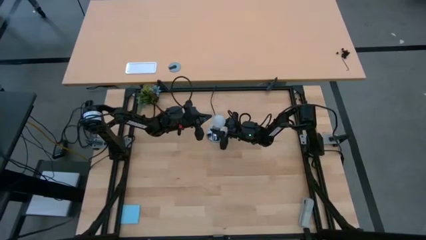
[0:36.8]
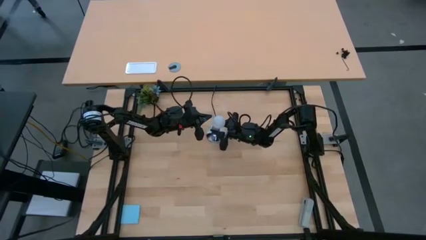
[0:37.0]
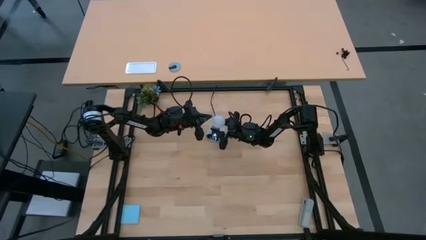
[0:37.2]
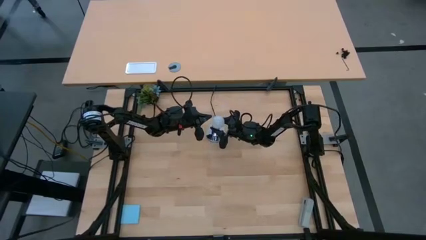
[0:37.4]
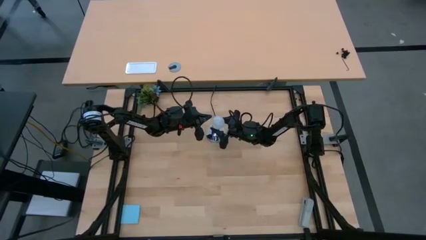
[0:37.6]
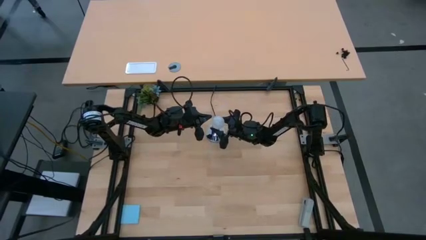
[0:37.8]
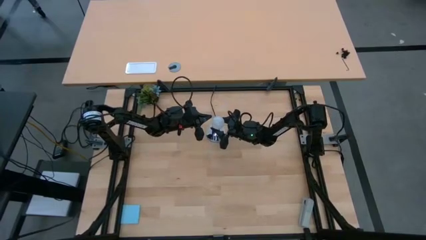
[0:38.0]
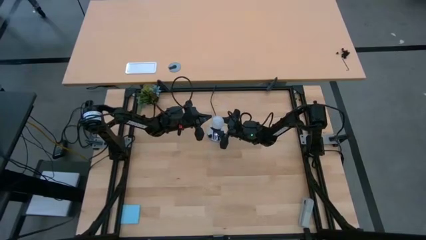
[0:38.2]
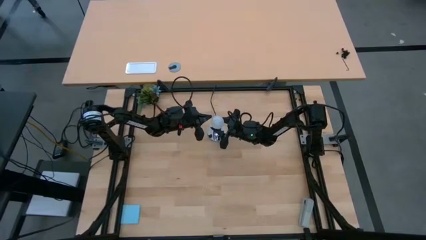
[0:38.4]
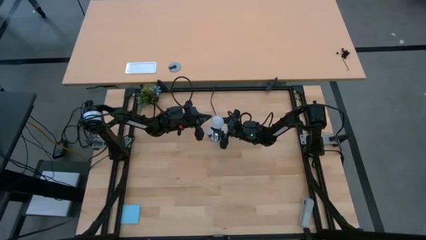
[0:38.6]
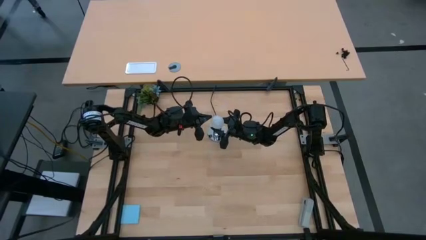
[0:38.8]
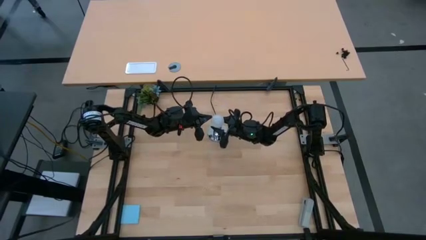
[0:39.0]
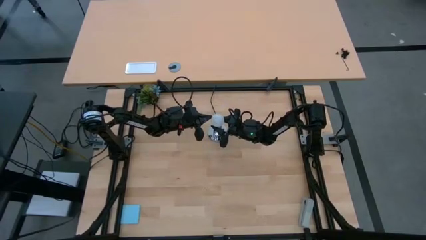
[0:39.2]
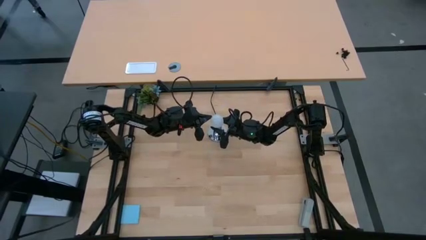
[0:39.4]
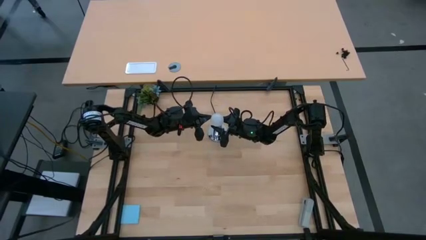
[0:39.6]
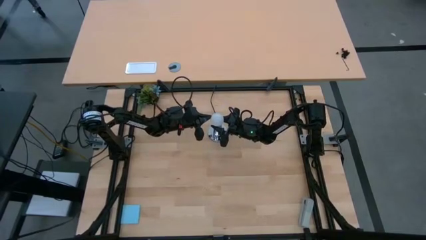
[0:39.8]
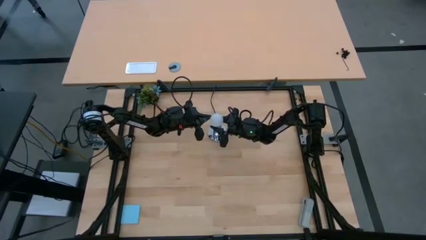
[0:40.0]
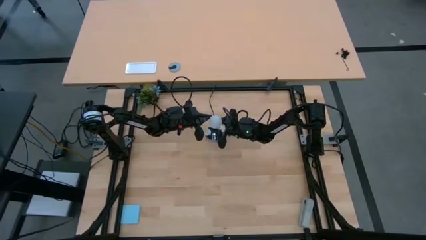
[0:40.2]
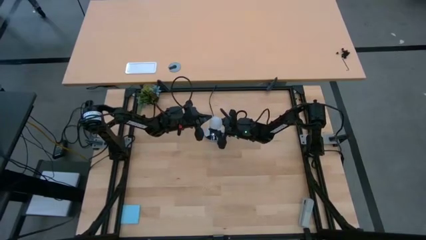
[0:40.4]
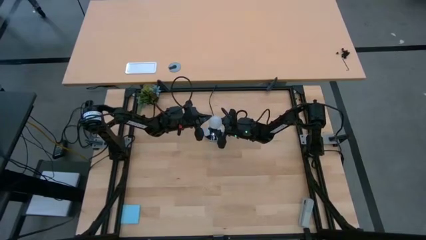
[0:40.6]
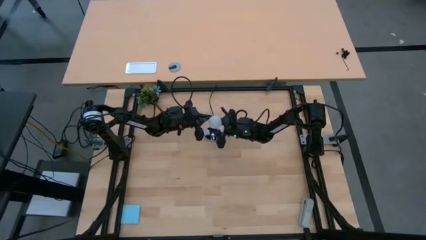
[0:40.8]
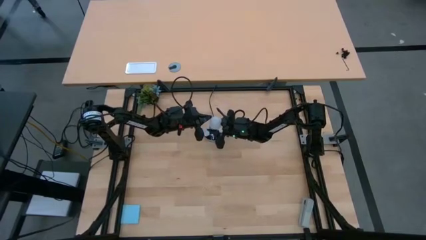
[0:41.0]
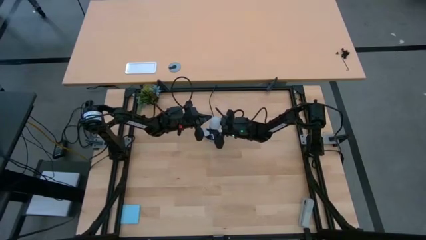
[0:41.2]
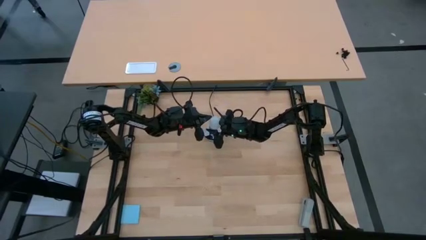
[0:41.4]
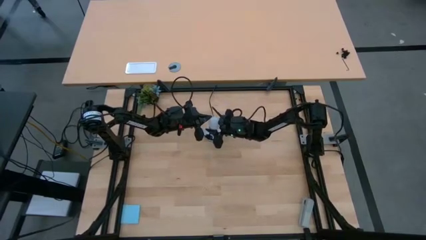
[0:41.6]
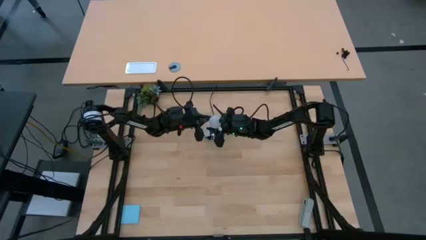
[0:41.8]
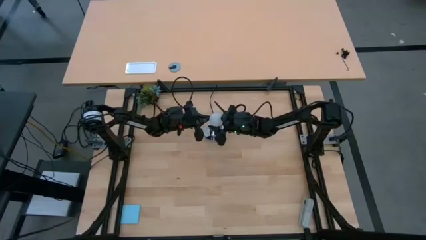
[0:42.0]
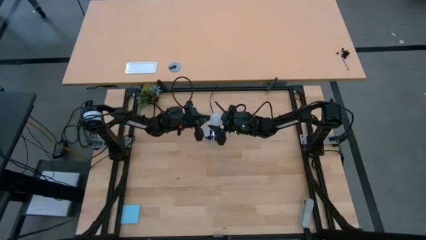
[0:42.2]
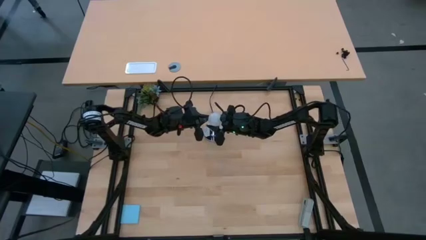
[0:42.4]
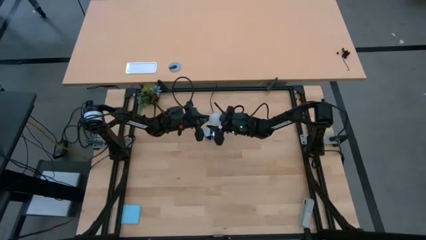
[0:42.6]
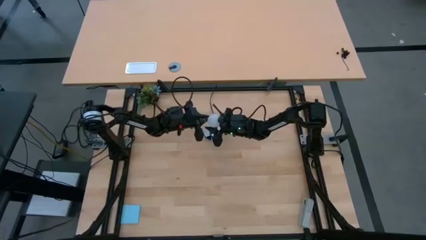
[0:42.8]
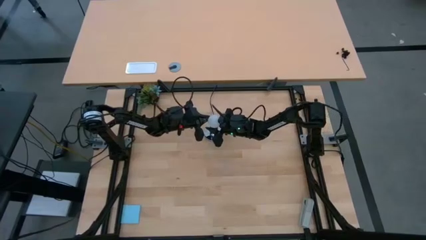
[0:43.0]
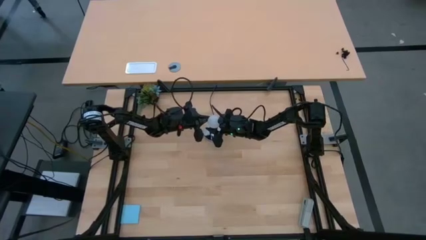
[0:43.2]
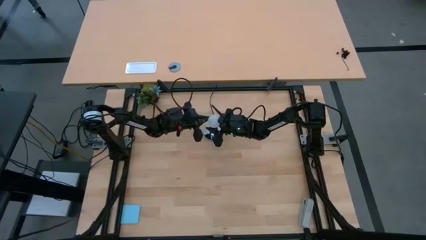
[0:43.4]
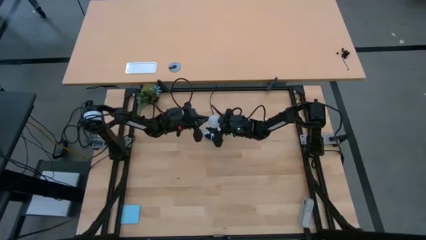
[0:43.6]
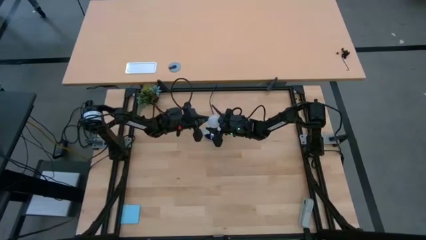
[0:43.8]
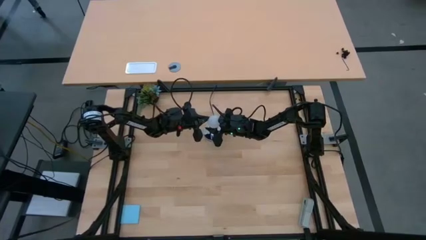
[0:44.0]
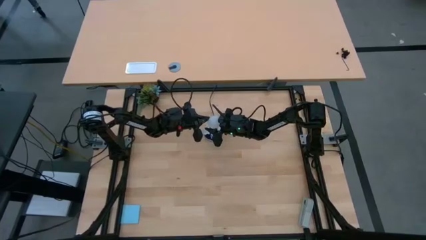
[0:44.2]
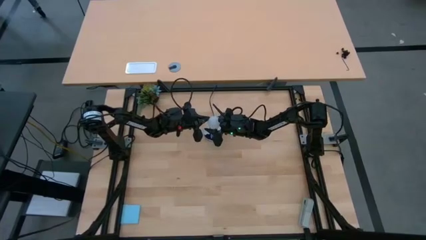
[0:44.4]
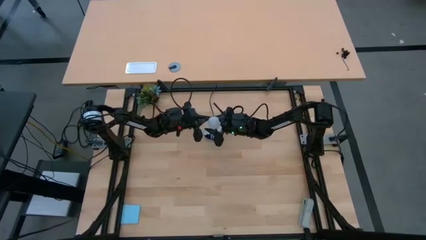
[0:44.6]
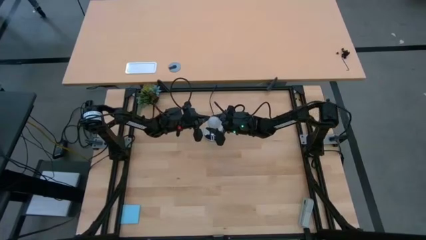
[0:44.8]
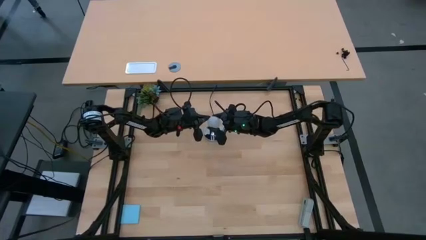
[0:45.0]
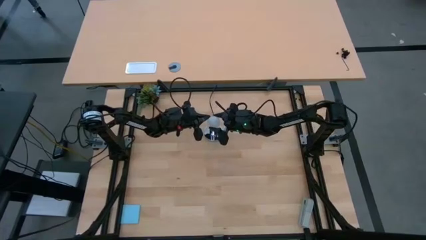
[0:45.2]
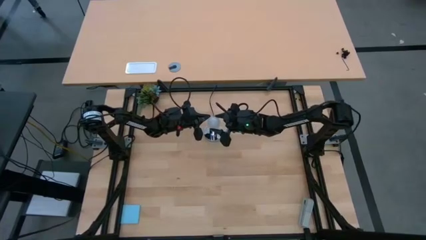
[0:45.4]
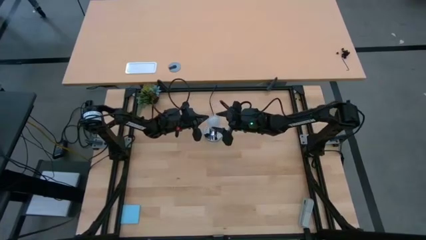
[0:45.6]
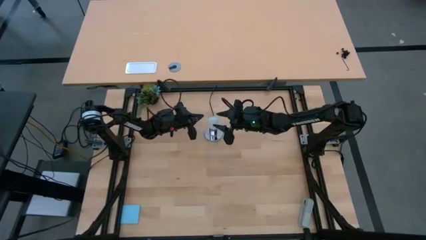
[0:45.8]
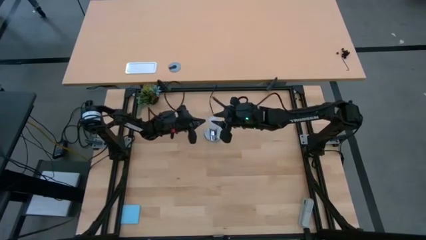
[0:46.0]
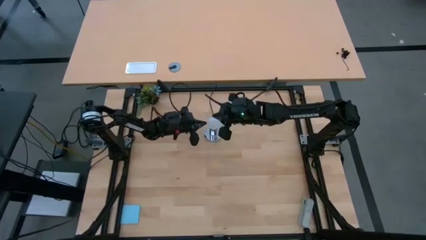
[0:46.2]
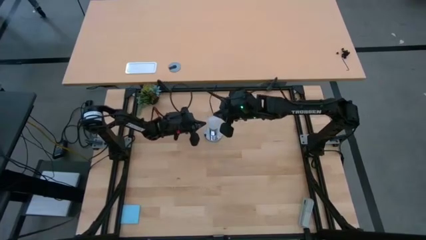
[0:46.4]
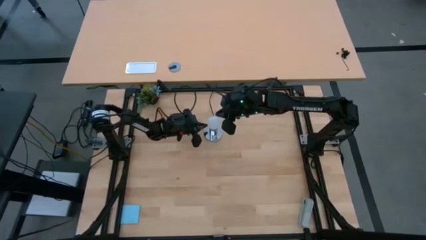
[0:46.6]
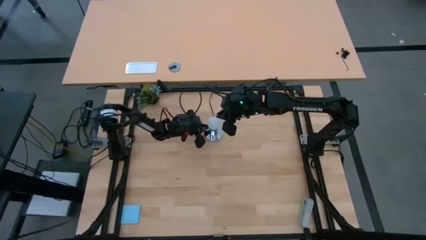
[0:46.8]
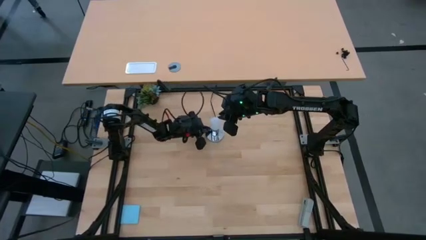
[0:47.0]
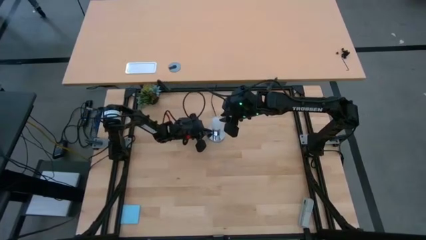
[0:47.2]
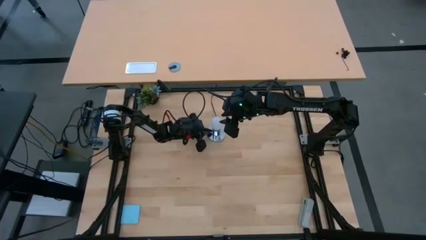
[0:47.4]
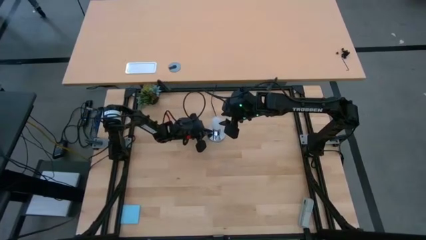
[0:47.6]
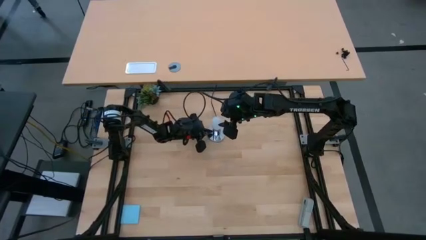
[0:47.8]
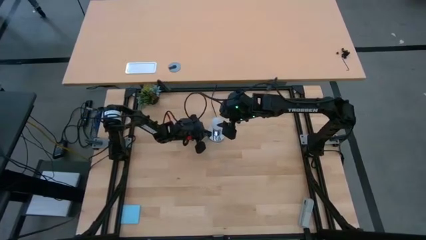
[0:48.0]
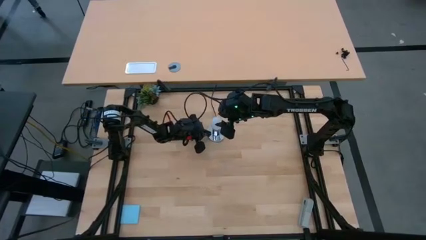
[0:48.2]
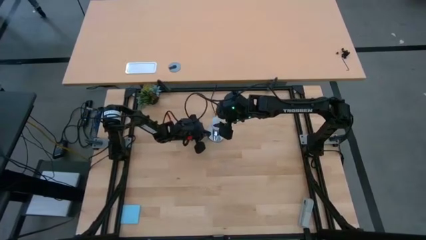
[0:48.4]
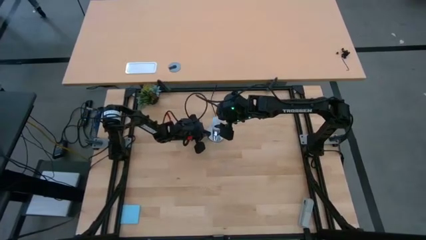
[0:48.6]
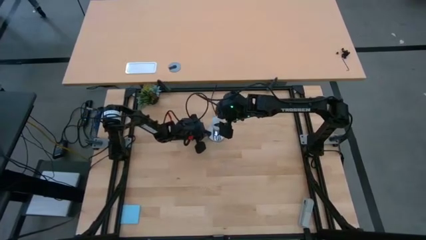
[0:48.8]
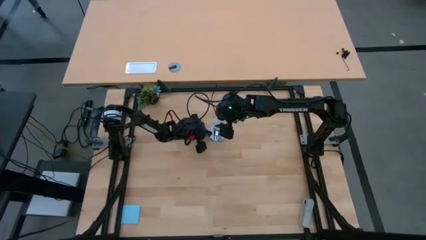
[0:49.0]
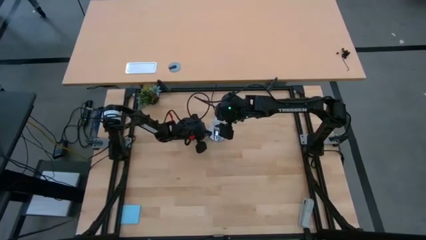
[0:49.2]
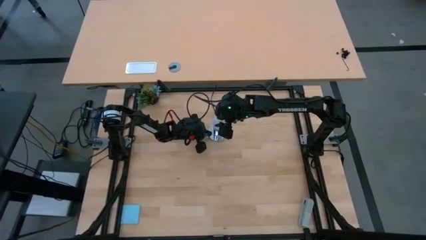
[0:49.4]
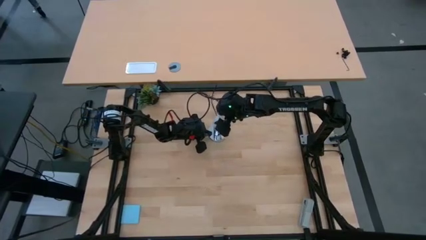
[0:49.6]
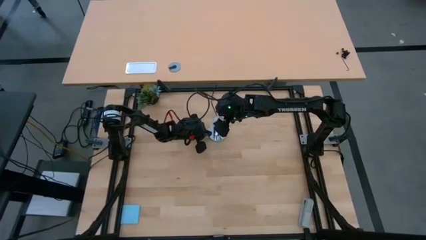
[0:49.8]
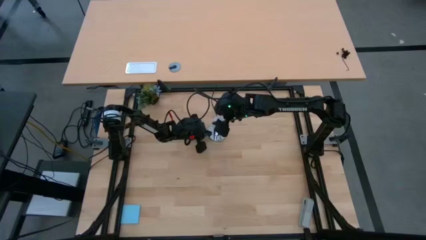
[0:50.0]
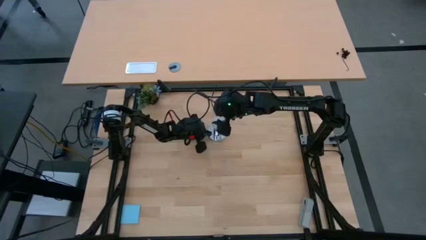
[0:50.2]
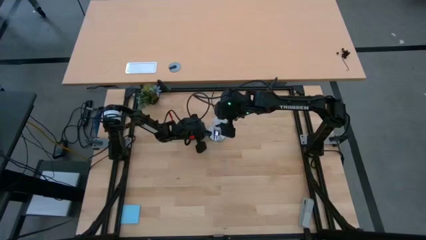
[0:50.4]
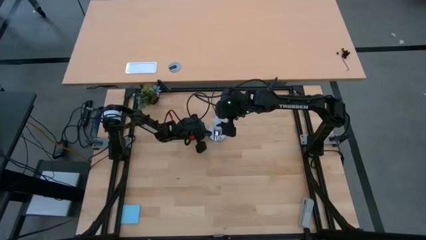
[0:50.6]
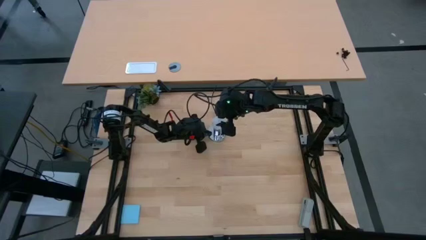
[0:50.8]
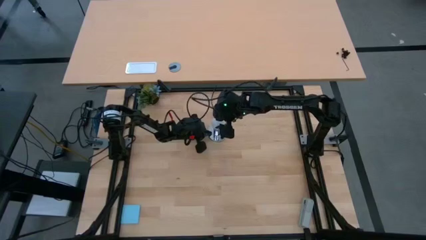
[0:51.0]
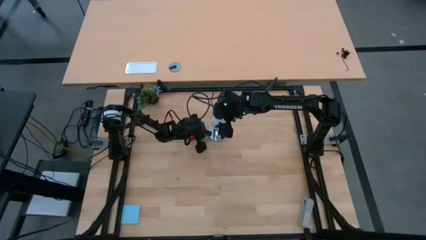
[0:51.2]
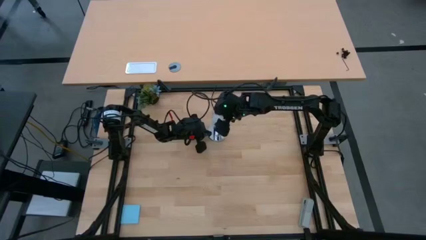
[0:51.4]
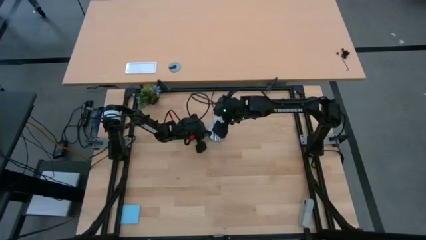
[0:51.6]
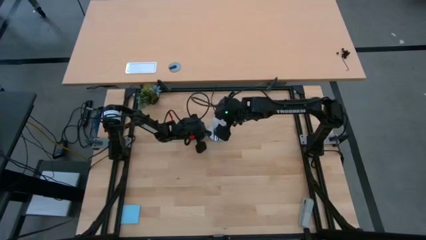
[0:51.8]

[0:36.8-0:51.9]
Task: Screw lightbulb
Insert the white lightbulb into the silver lamp
